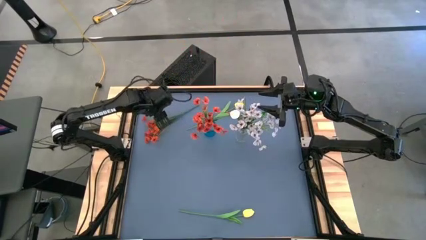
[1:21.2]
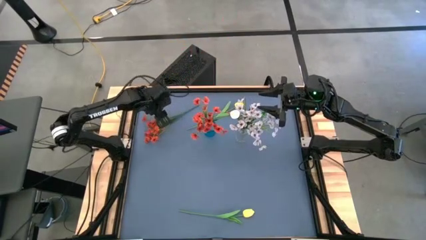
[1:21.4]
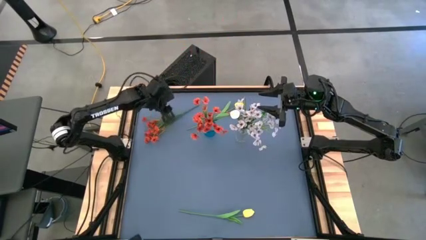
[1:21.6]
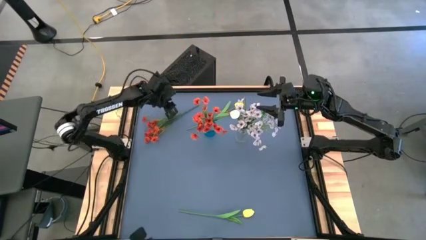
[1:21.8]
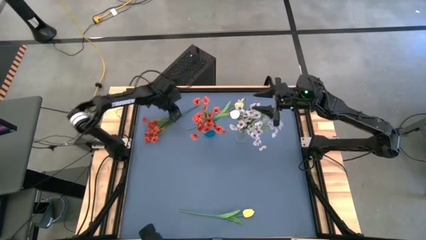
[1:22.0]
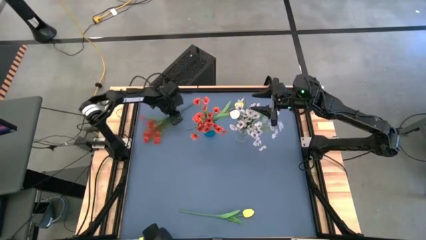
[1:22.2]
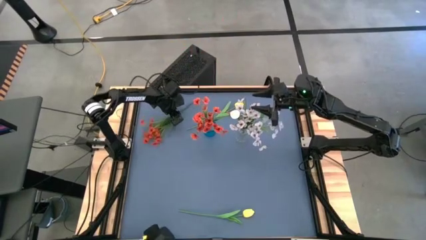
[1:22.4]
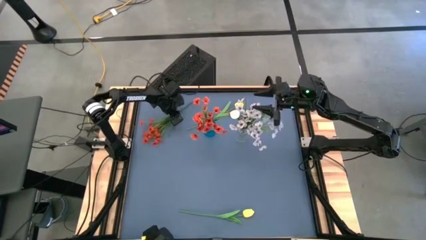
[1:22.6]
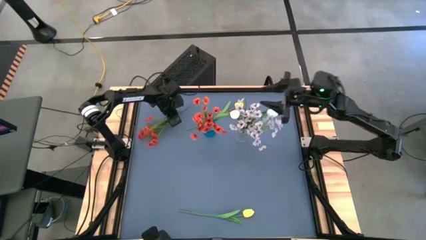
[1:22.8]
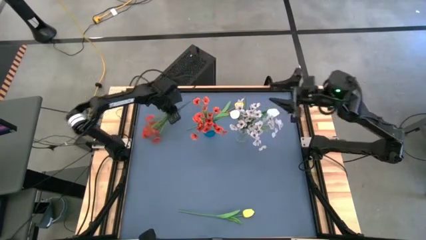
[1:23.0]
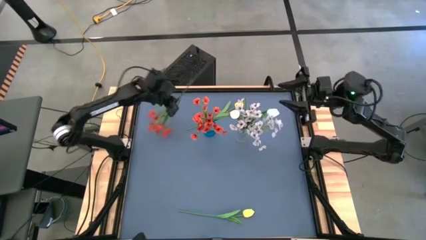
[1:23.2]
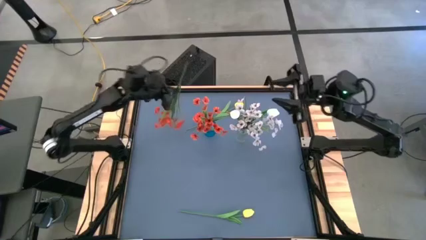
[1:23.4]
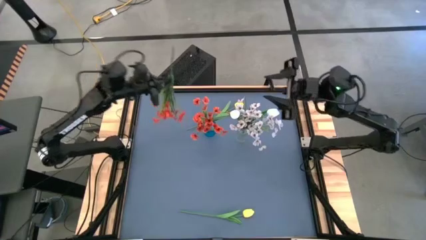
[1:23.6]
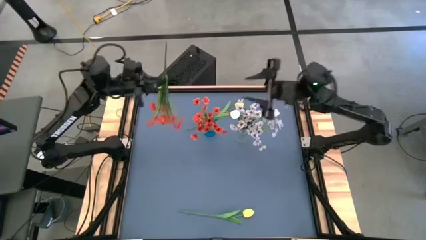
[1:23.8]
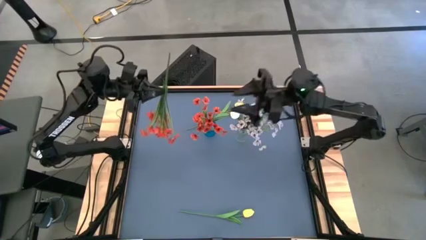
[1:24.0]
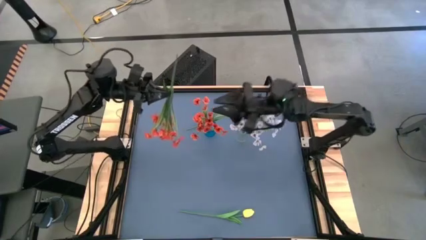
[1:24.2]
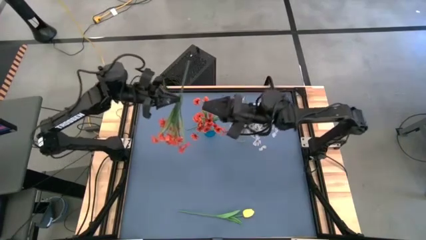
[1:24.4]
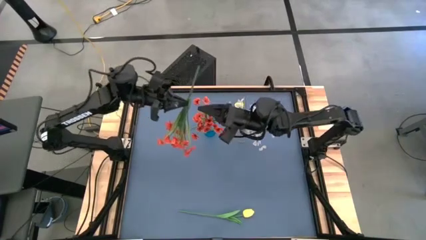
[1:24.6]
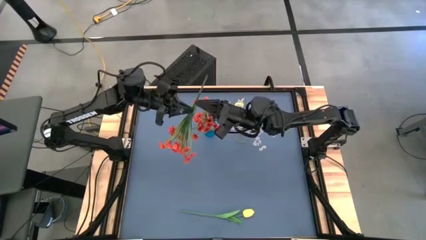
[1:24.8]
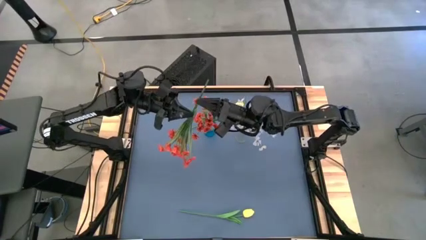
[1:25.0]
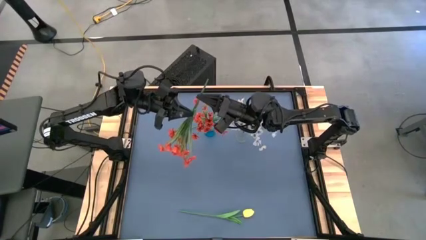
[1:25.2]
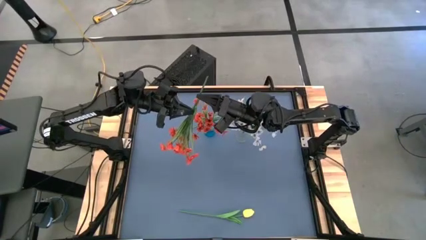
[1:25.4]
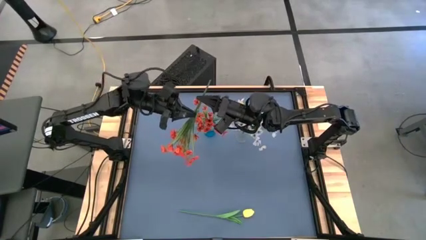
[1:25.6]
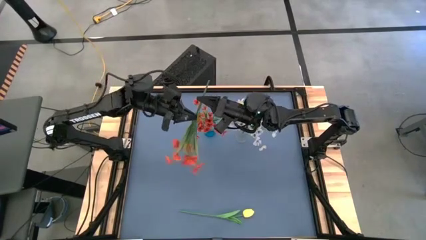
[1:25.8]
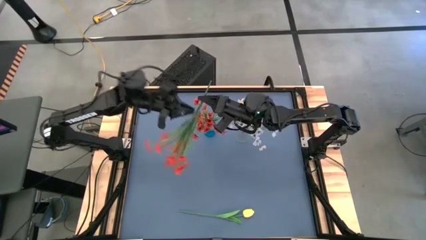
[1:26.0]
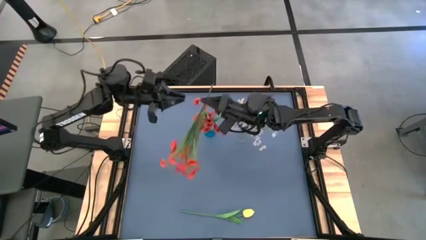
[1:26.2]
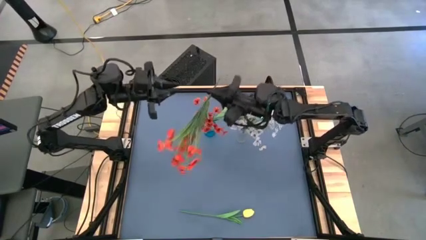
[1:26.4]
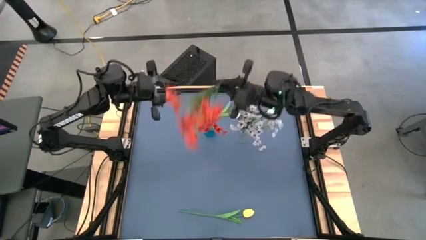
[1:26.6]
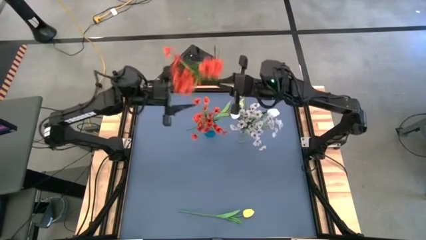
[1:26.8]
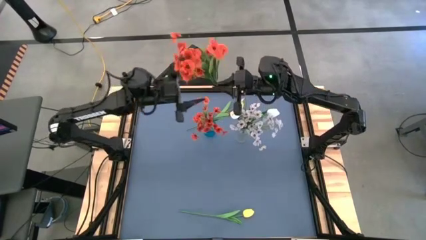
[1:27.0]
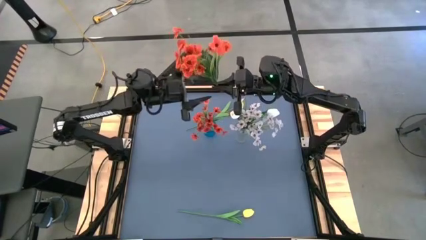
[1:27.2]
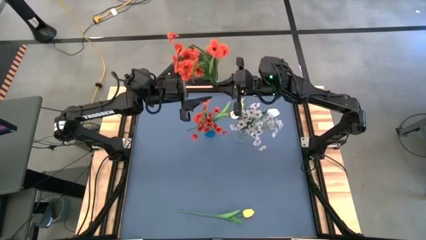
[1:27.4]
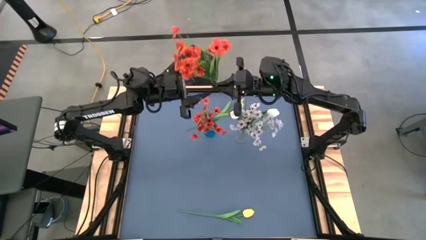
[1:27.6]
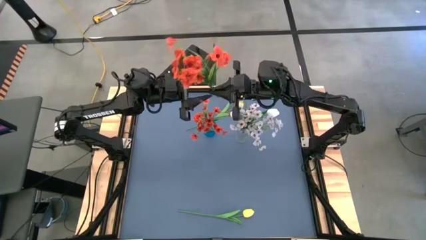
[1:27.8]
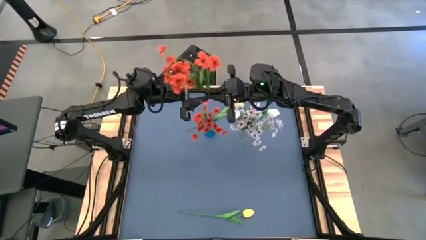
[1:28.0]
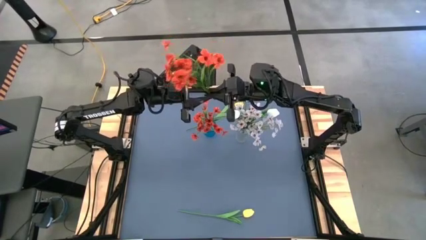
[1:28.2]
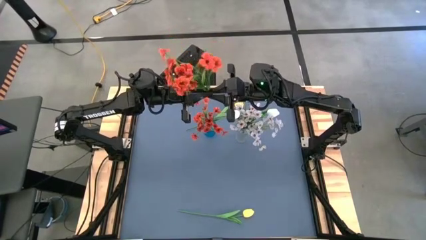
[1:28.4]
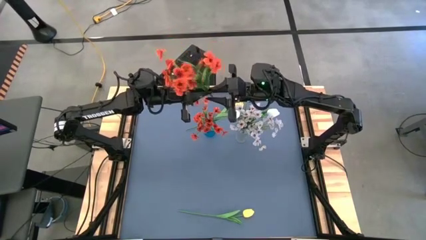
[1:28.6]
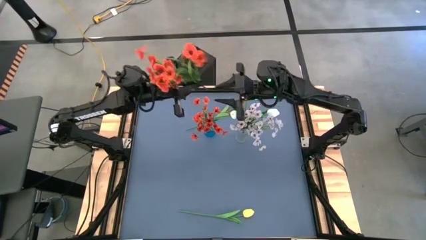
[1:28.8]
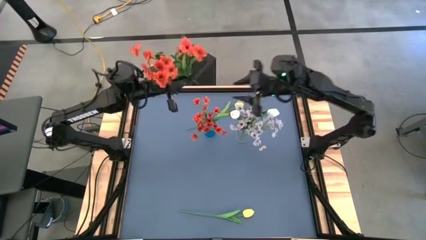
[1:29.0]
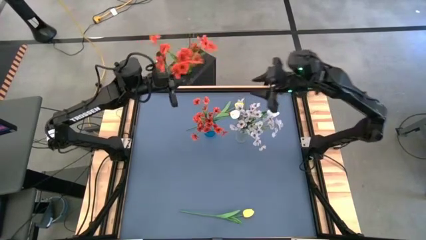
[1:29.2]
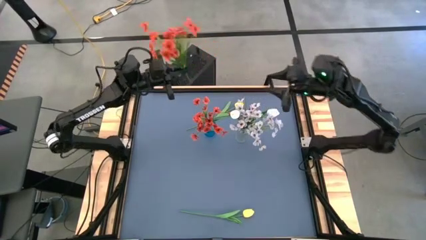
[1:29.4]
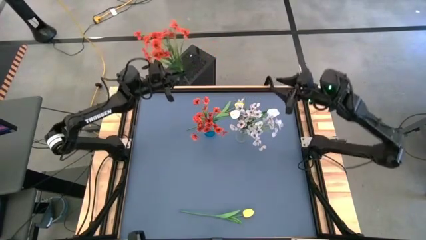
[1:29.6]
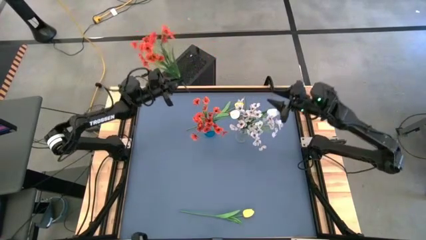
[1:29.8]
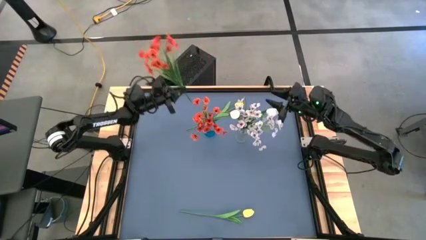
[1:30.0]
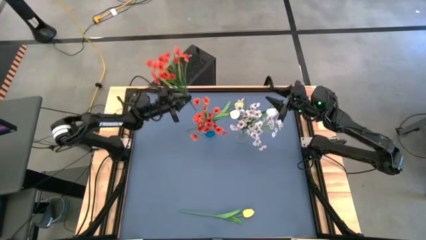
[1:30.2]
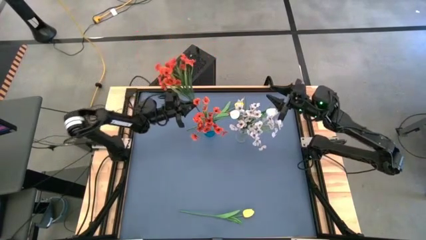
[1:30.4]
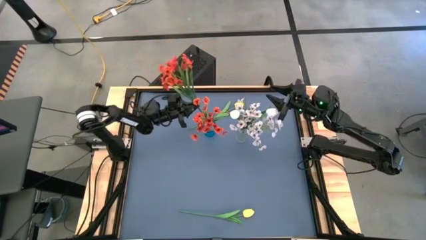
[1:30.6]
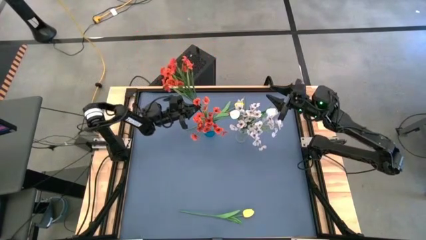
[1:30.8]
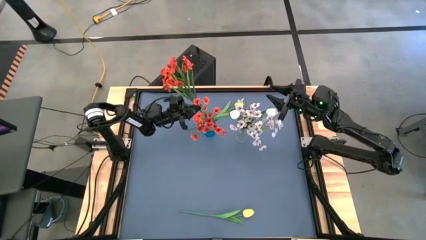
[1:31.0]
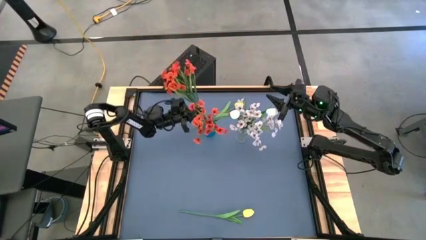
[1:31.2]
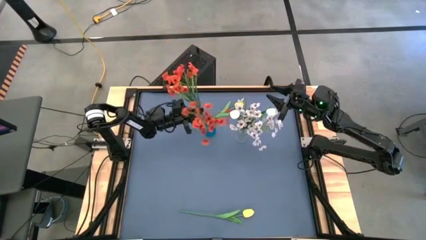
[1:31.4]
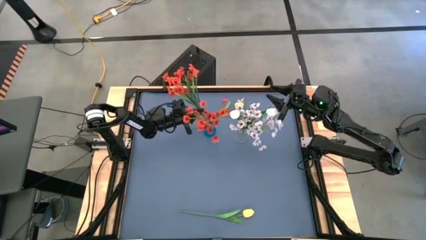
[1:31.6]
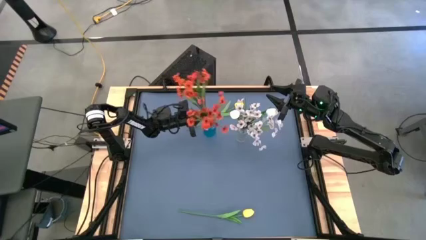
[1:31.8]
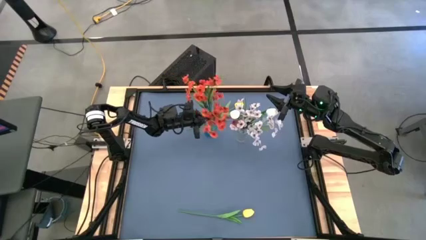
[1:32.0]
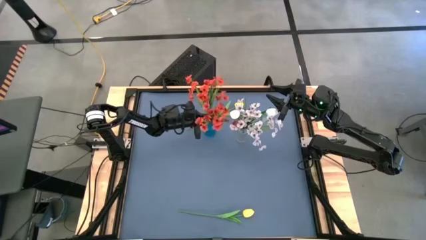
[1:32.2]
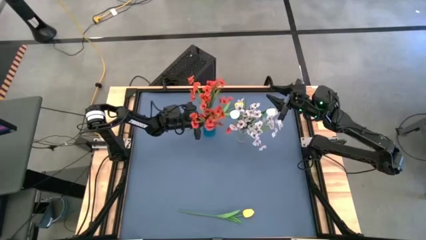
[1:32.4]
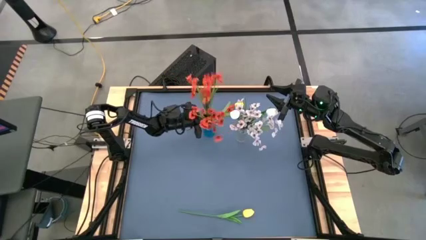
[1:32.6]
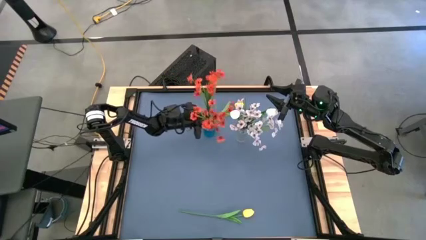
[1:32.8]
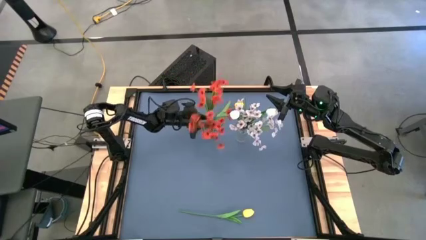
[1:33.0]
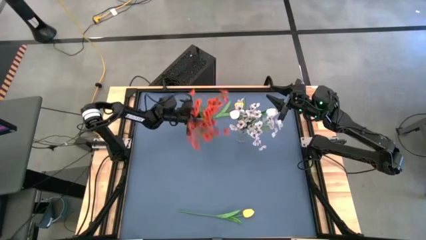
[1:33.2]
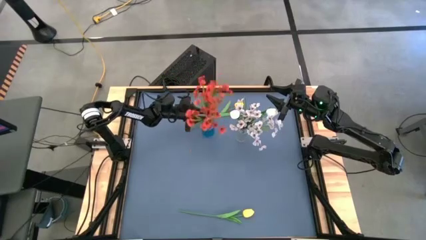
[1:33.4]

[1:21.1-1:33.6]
Task: Sort flowers into vase by color
Put the orange flowers into the blue vase

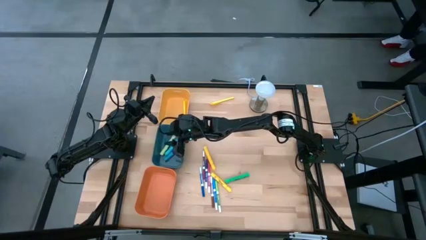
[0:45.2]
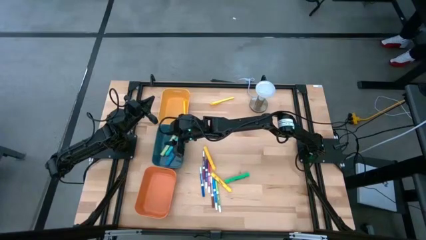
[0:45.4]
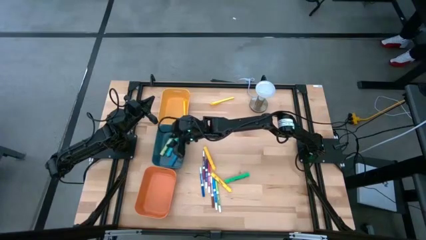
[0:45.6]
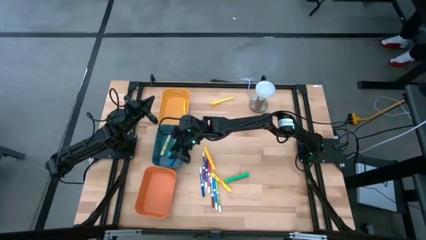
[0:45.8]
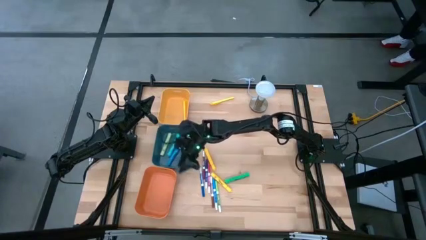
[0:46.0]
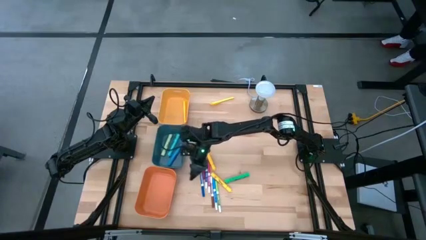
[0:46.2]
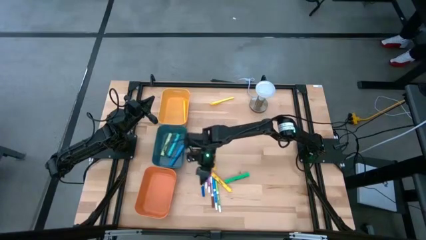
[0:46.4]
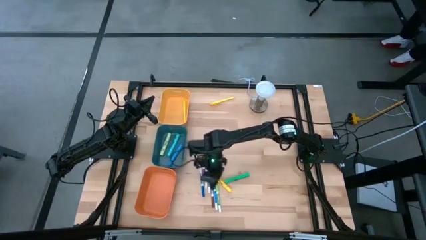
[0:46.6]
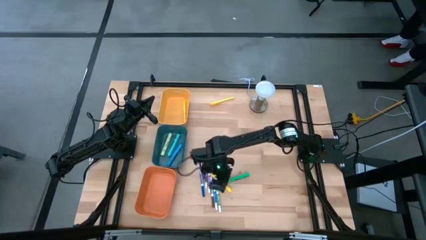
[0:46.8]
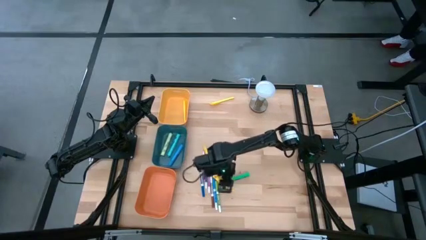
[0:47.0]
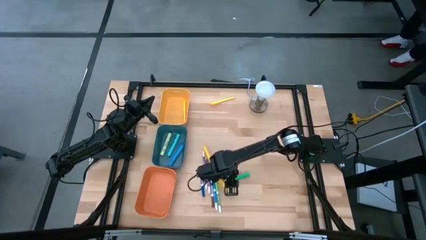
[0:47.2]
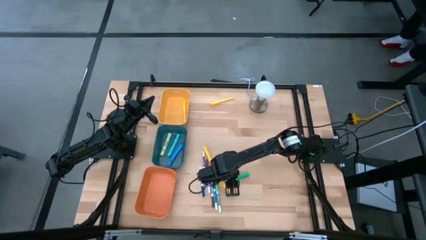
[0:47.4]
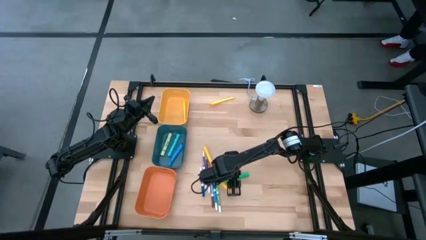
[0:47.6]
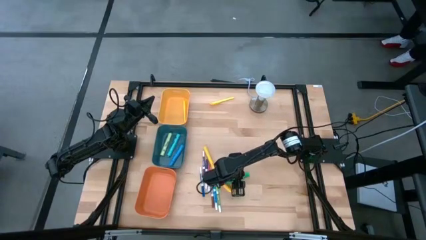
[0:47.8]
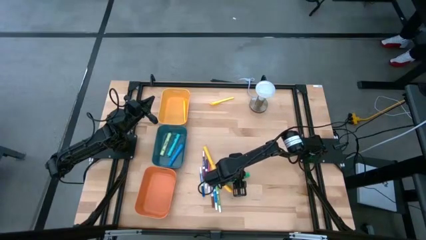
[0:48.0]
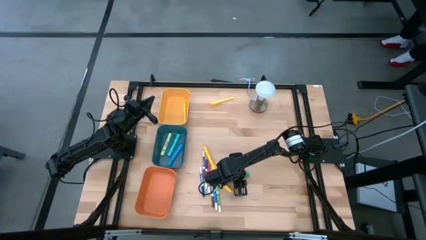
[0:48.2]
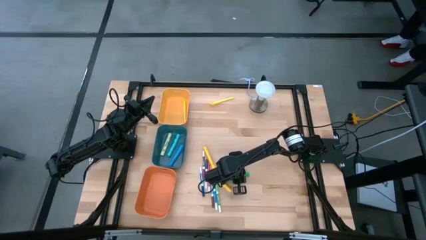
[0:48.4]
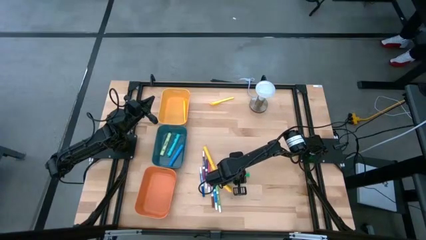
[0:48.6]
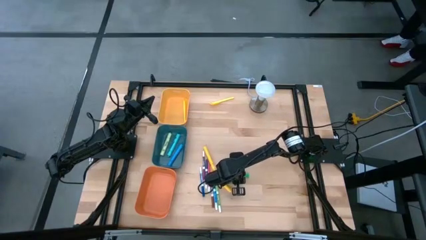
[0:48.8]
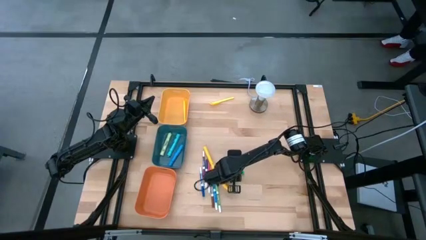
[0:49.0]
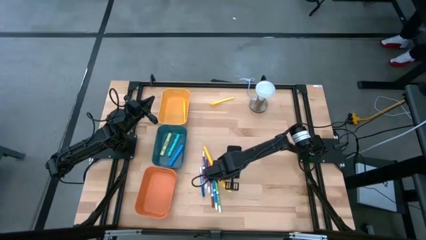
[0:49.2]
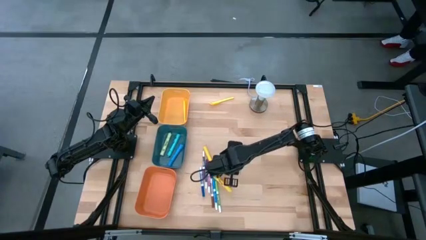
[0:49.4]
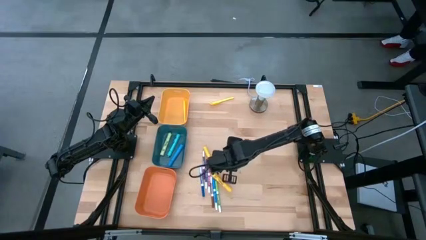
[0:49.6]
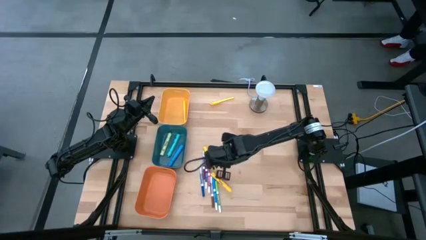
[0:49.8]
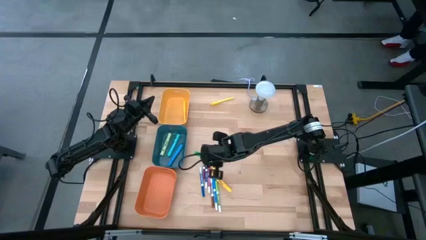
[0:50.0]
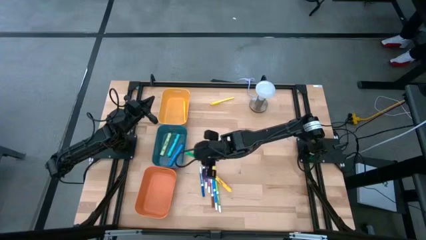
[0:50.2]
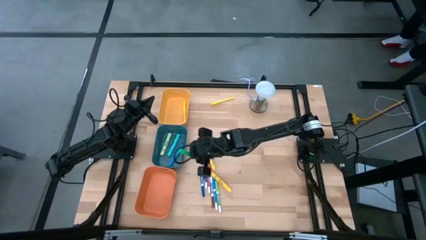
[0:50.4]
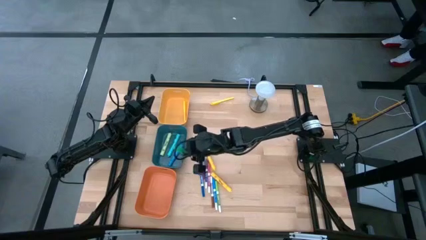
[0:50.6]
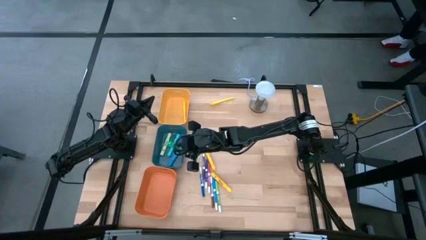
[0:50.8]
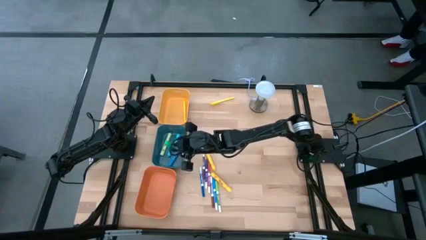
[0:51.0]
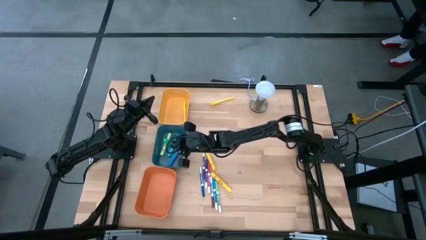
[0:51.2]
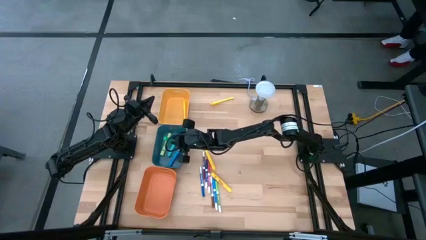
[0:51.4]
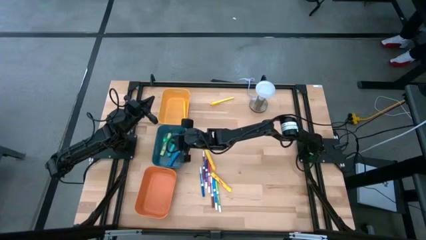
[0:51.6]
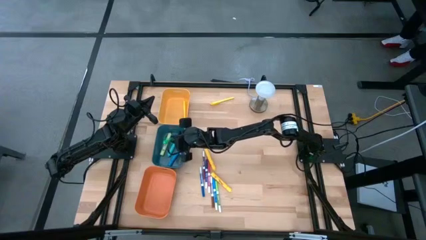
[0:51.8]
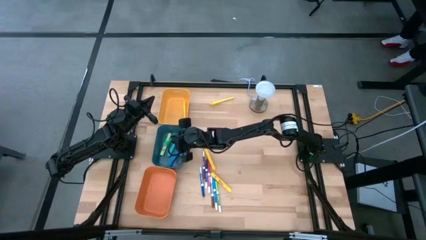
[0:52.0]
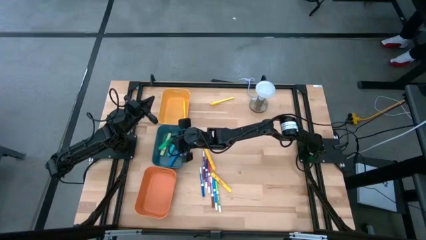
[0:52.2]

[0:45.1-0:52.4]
Task: Pick & Place Markers
Put the green highlighter pen into the blue bin
